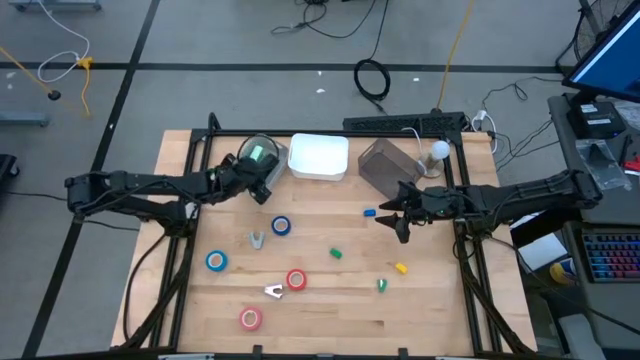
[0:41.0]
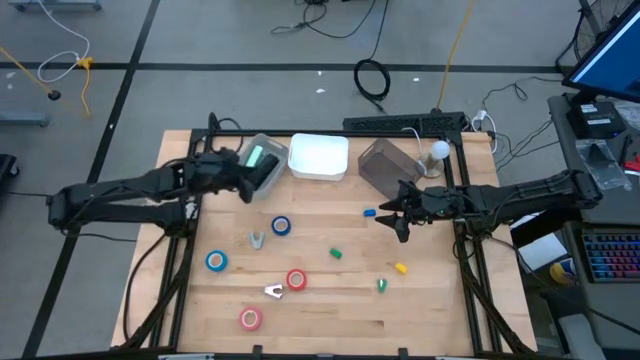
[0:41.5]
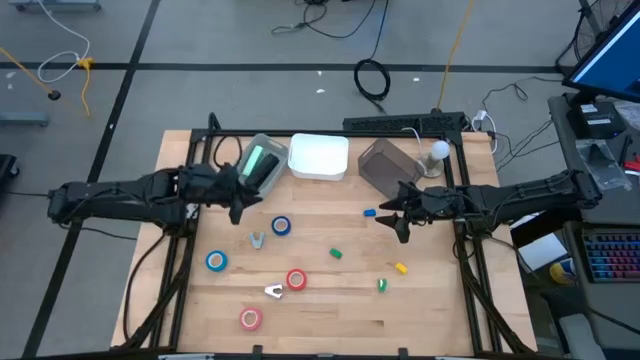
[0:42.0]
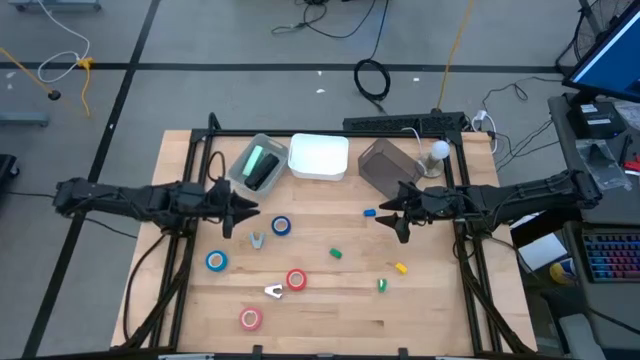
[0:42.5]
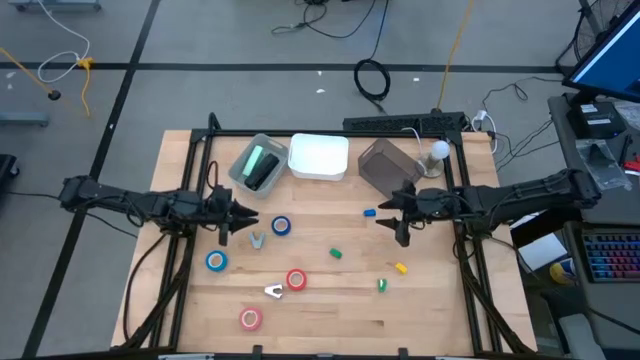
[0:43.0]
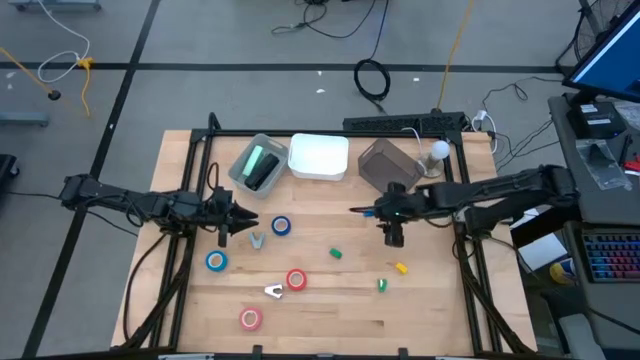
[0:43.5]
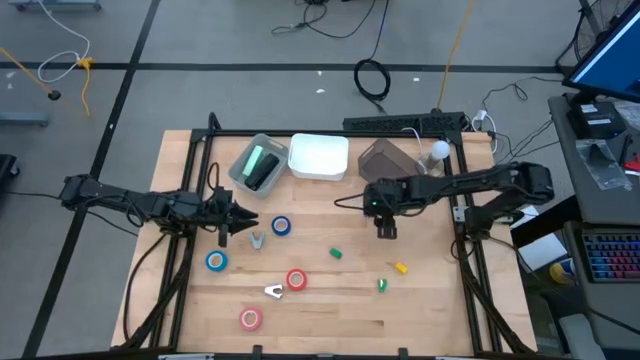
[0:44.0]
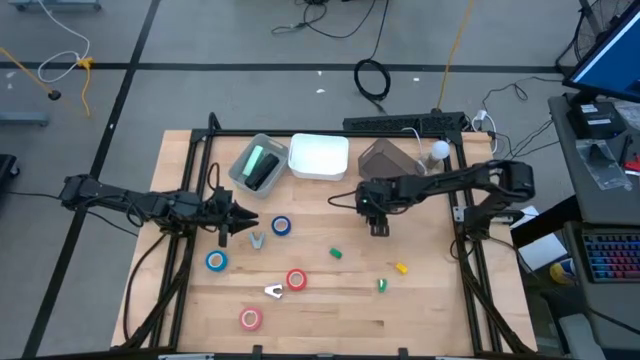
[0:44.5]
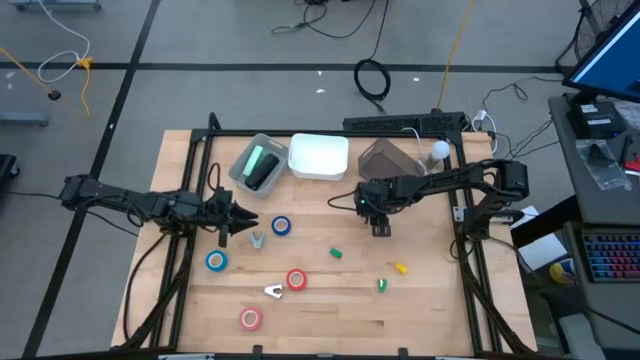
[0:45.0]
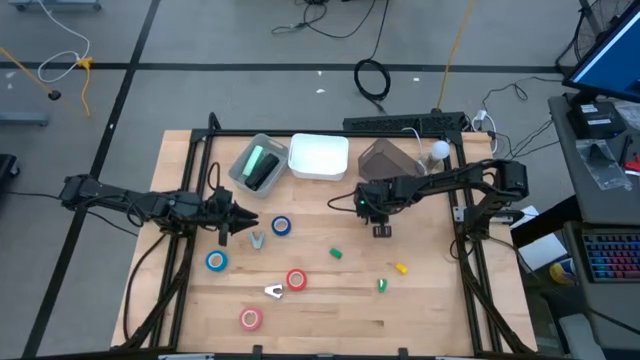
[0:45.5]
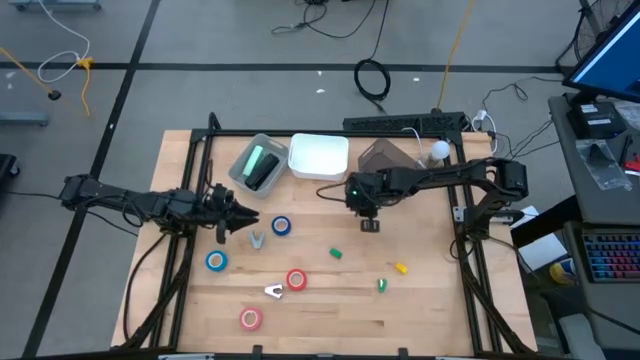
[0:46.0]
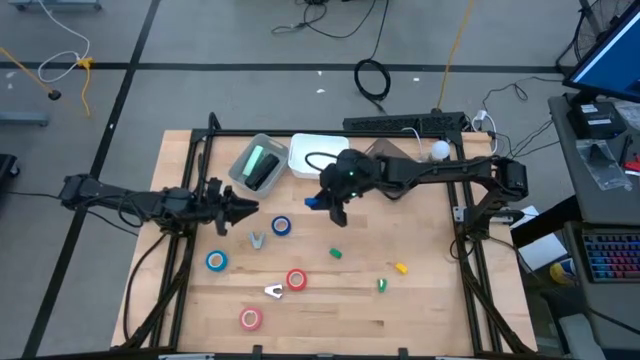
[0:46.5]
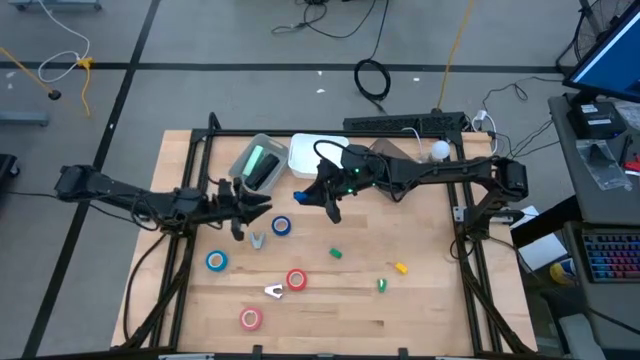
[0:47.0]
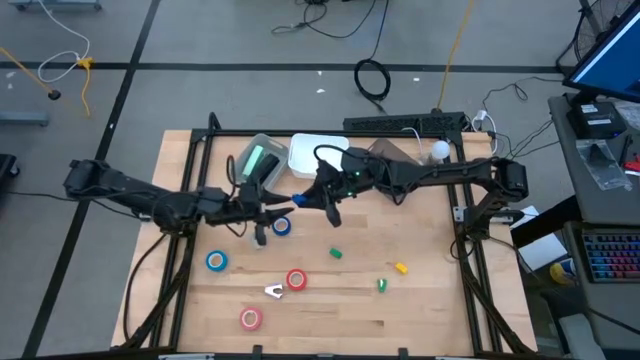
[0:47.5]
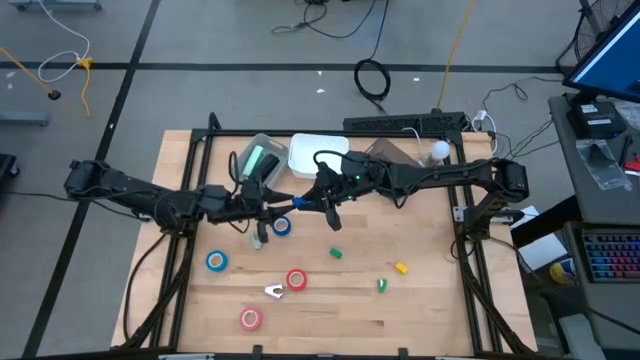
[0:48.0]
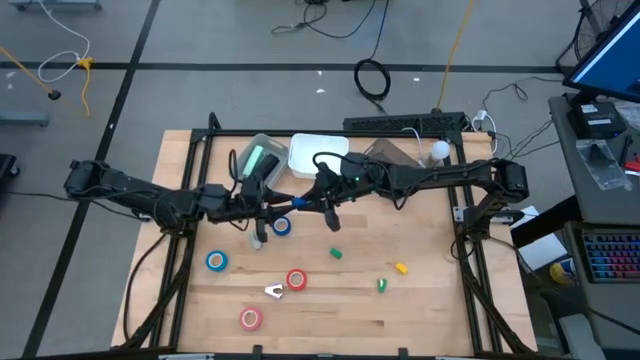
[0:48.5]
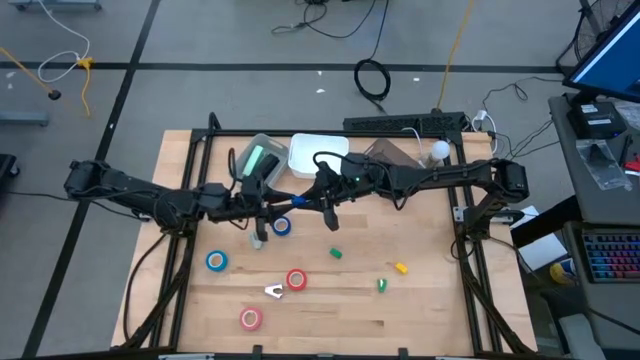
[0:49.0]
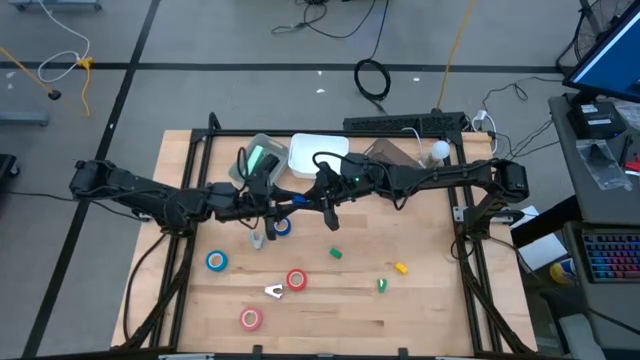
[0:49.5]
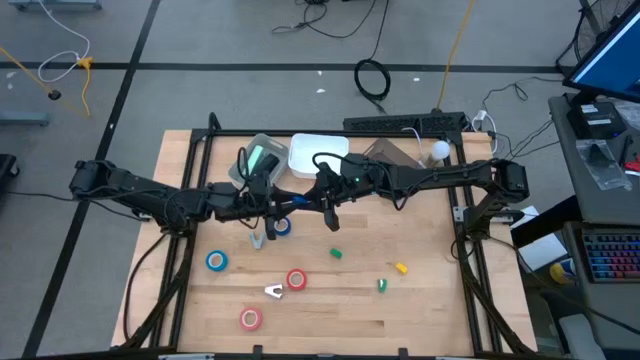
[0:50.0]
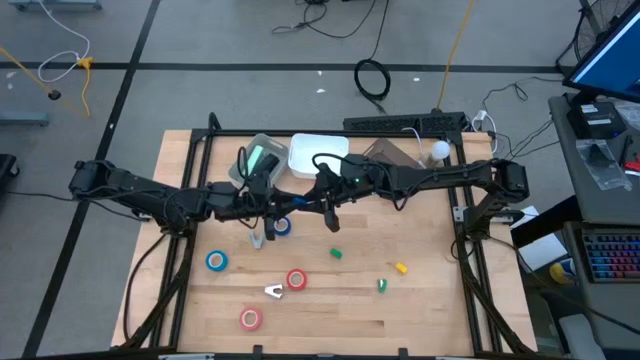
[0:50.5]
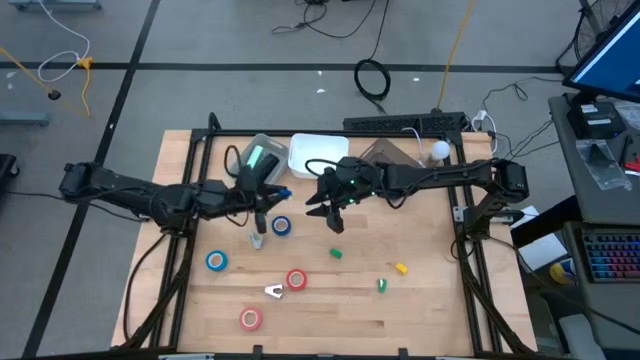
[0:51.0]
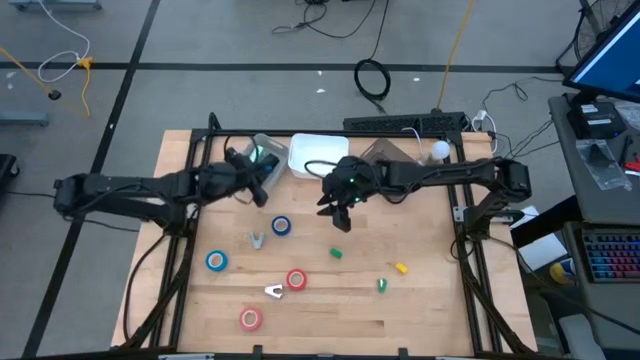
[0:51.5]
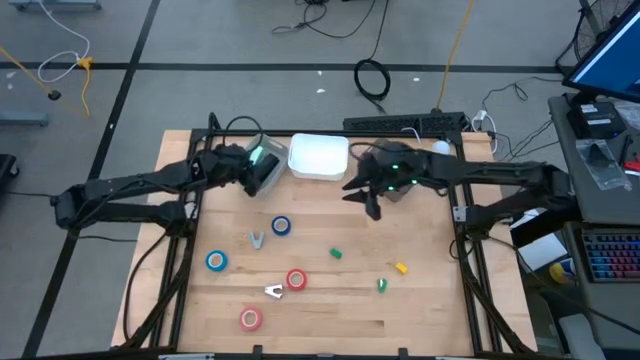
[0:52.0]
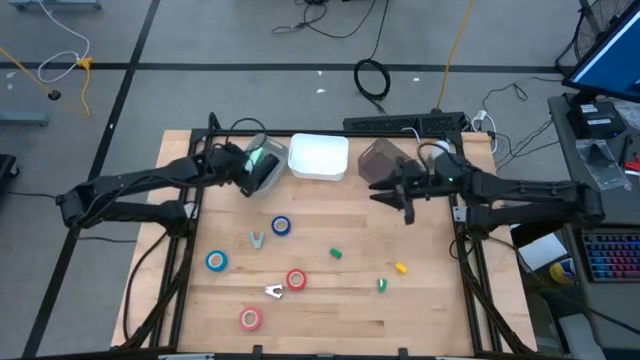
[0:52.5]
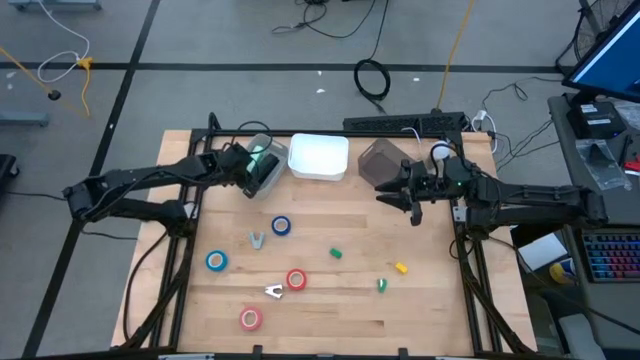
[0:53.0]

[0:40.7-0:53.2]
Task: Pick and place Stapler, Stapler remover, tape
Put the blue stapler into the gray bin

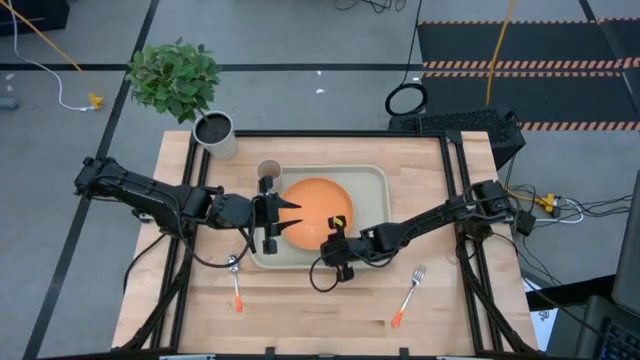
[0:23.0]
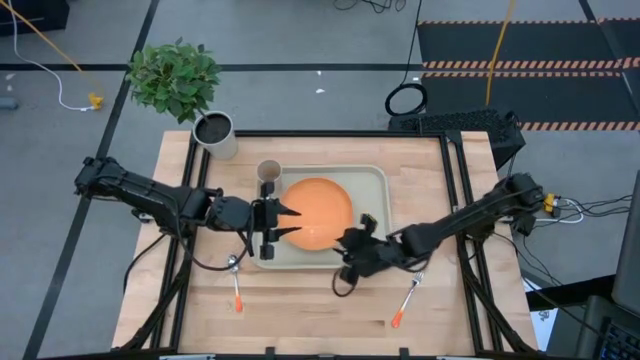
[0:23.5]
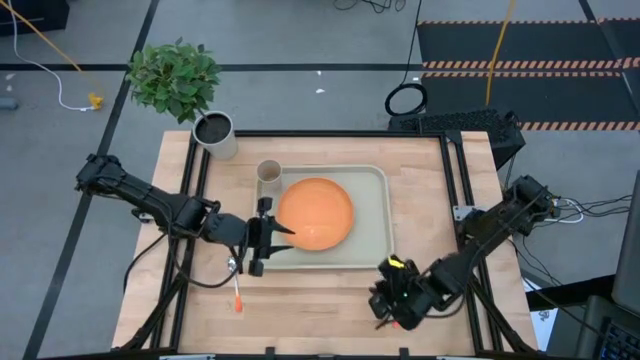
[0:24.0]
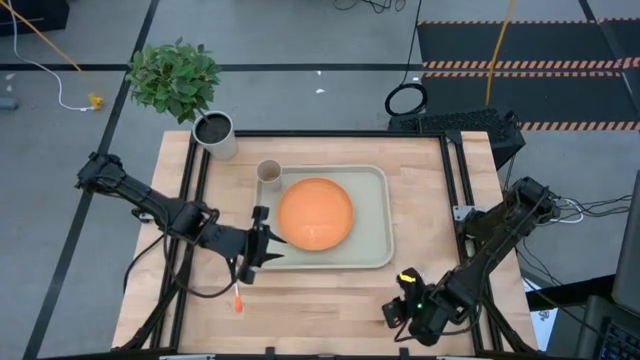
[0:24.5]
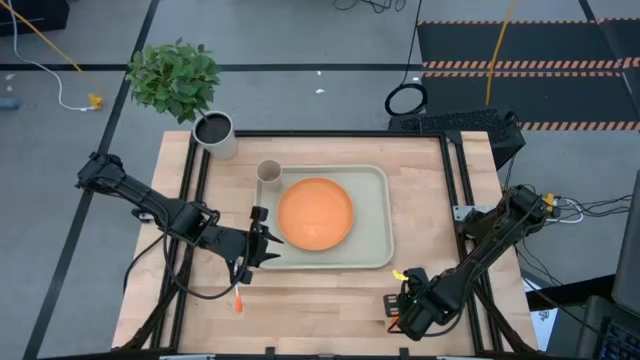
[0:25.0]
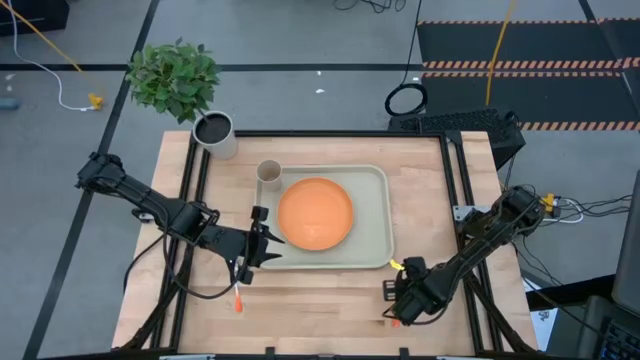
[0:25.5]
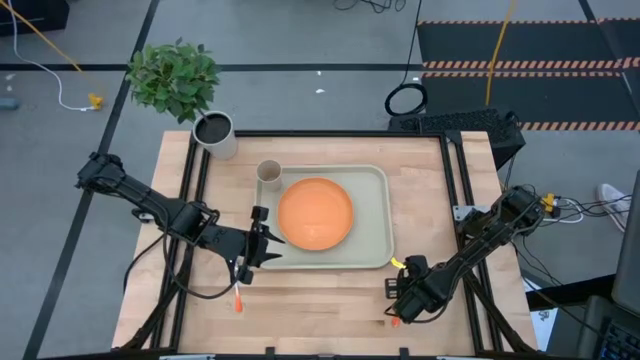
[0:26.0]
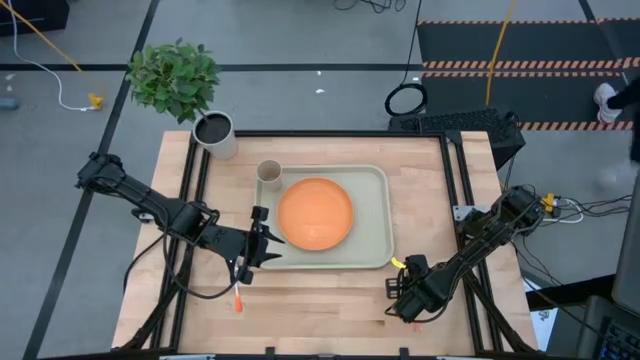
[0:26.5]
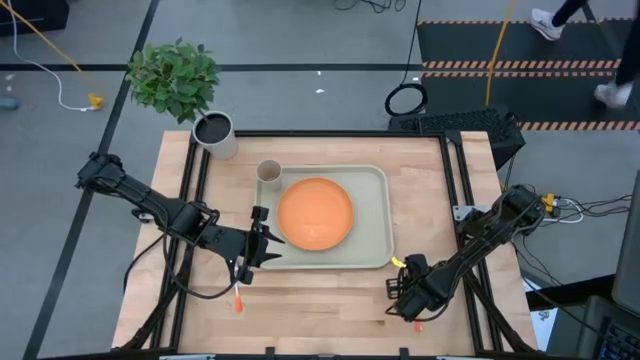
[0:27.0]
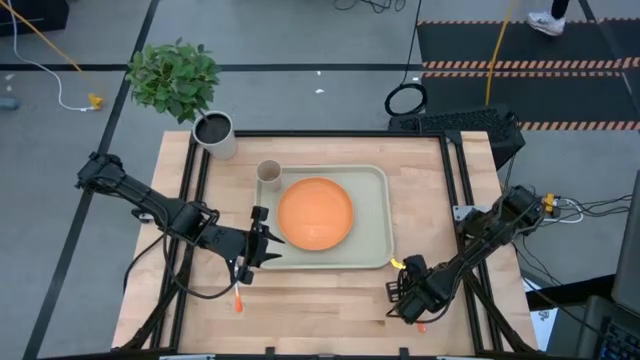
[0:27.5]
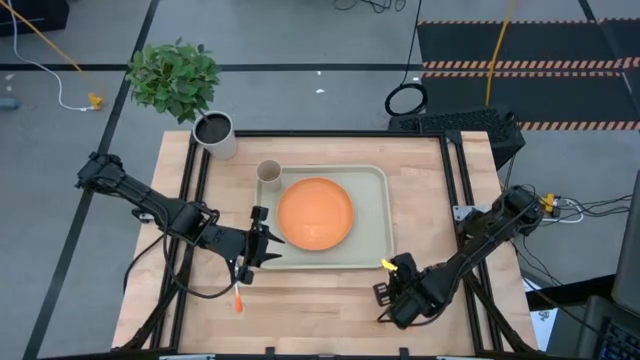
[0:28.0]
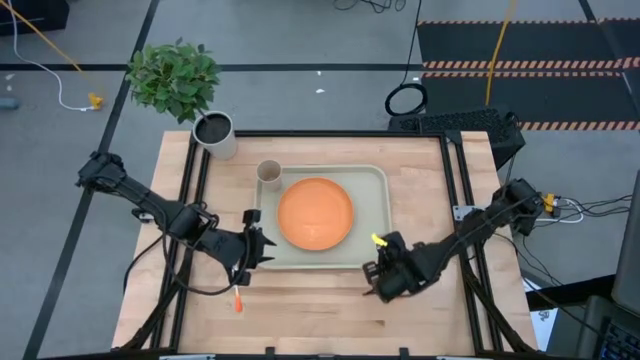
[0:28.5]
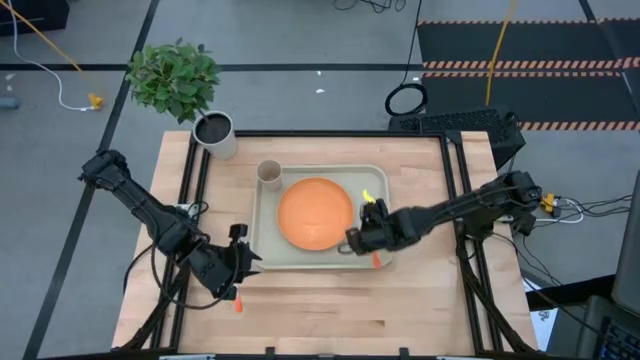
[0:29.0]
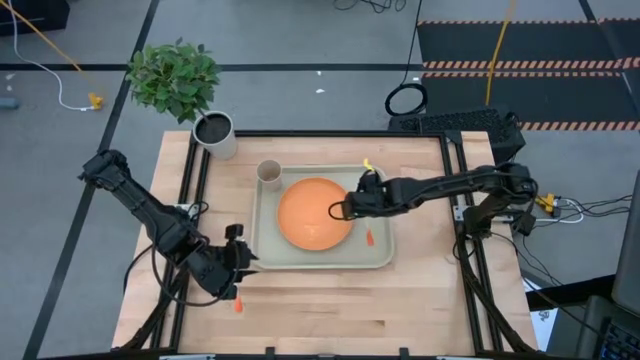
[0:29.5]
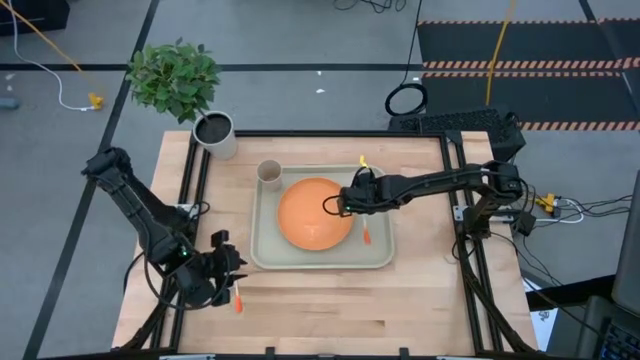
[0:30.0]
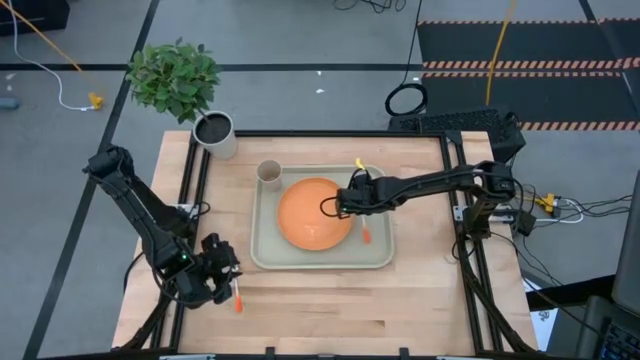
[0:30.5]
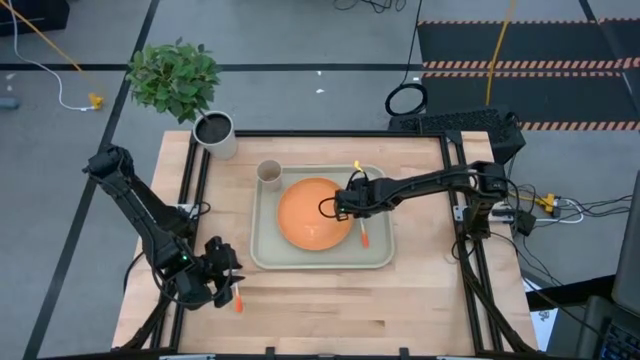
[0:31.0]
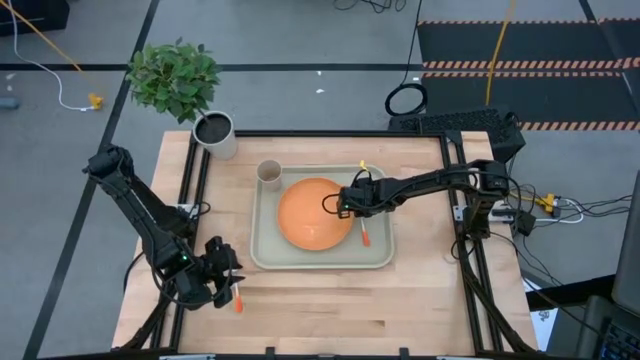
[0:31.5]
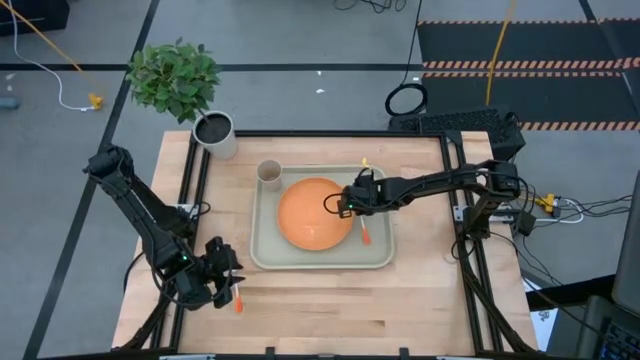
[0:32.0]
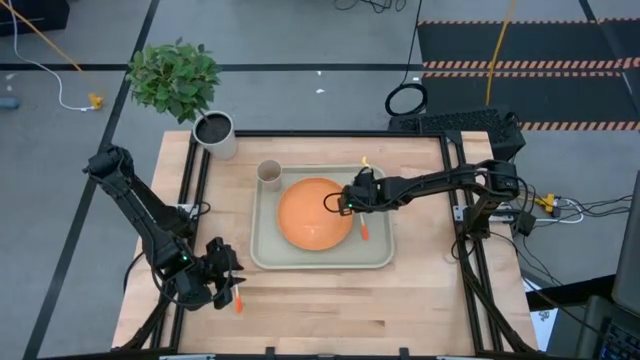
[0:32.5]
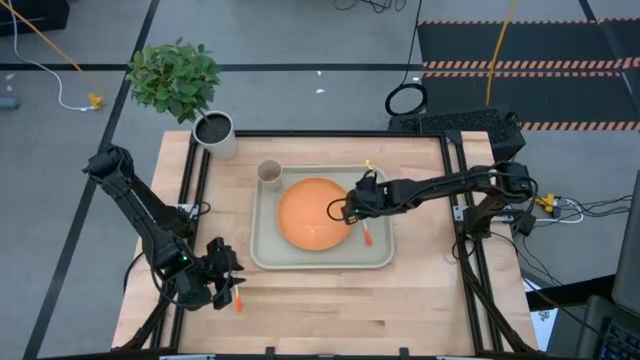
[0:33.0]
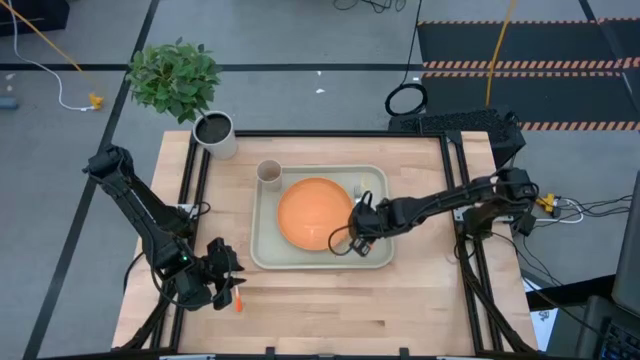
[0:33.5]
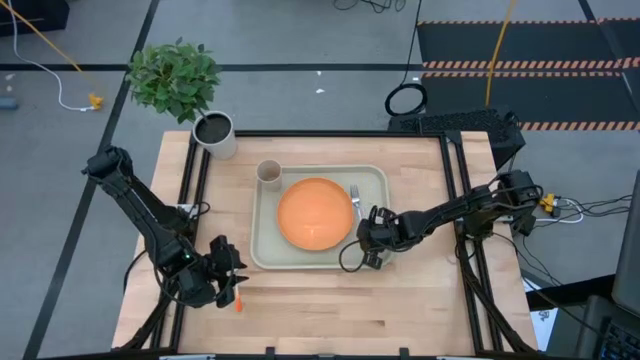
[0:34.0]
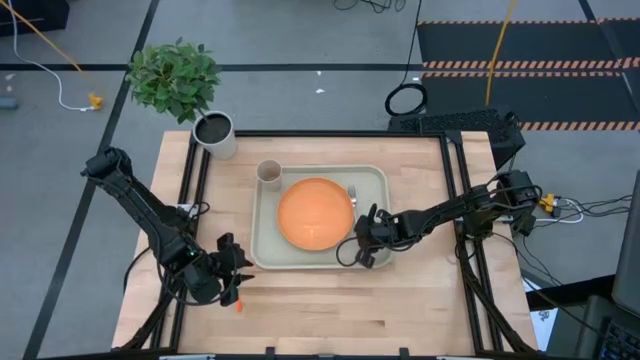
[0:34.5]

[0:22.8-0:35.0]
Task: Pick and place plate/cup/fork/spoon on tray
Put the orange fork beside the plate on the white serving tray to the right of the orange plate
